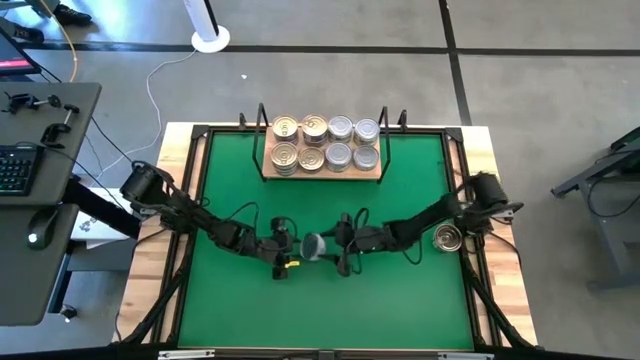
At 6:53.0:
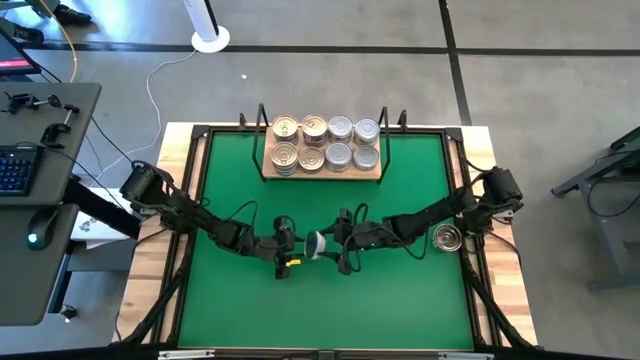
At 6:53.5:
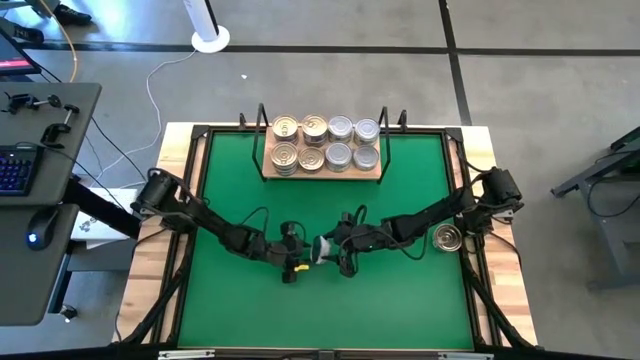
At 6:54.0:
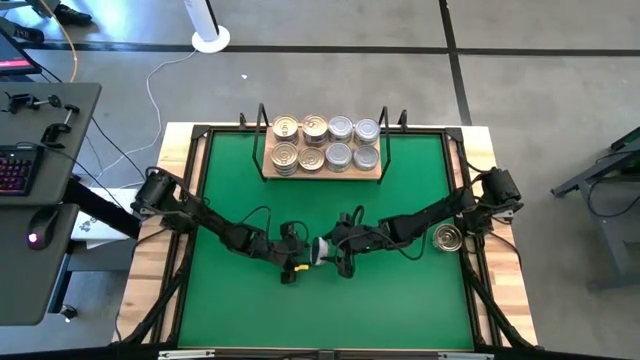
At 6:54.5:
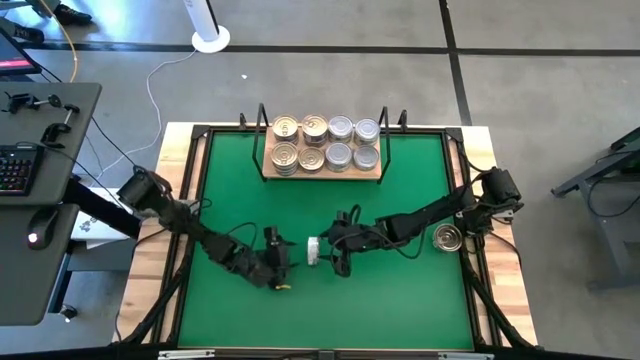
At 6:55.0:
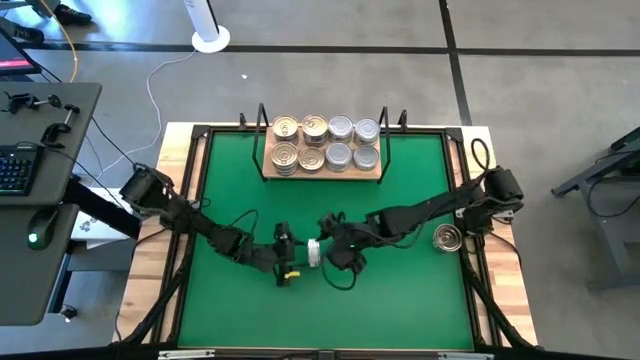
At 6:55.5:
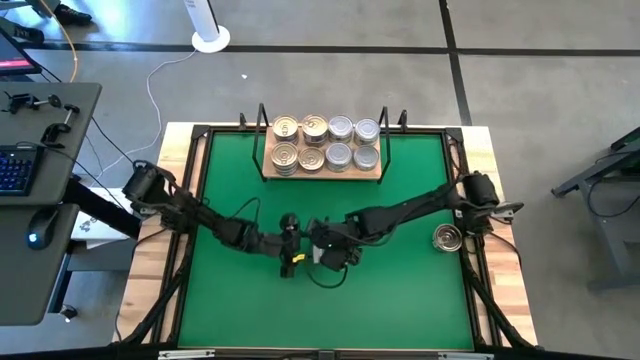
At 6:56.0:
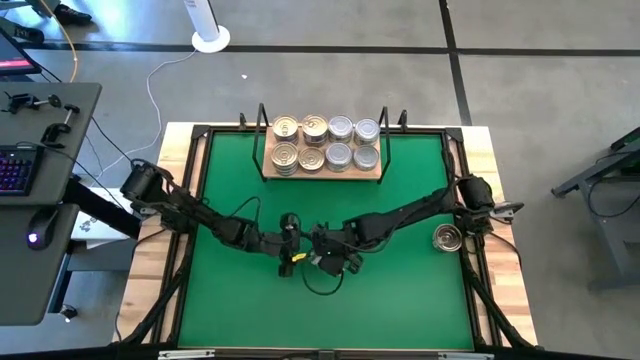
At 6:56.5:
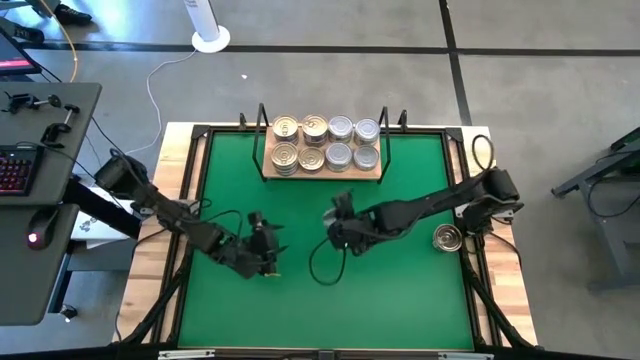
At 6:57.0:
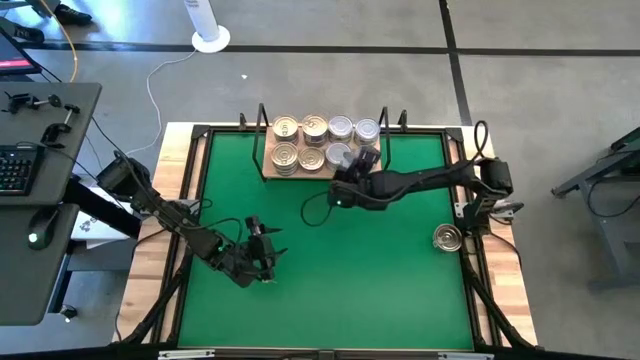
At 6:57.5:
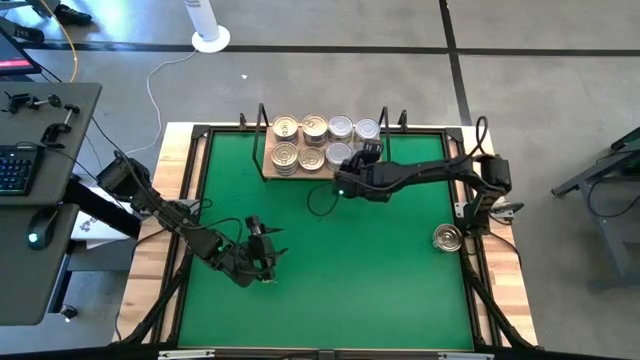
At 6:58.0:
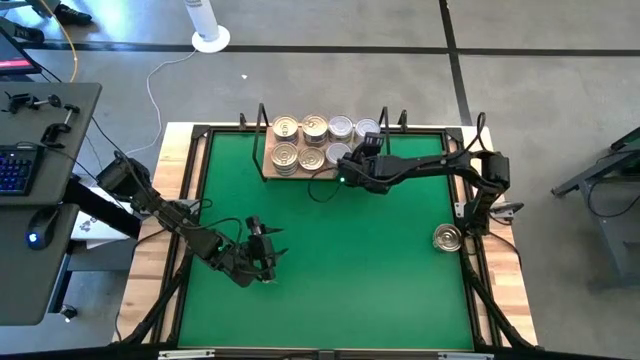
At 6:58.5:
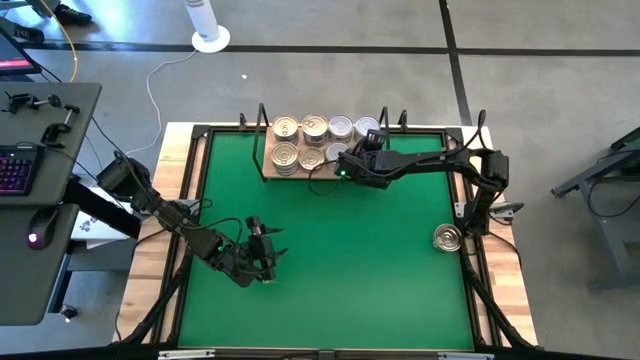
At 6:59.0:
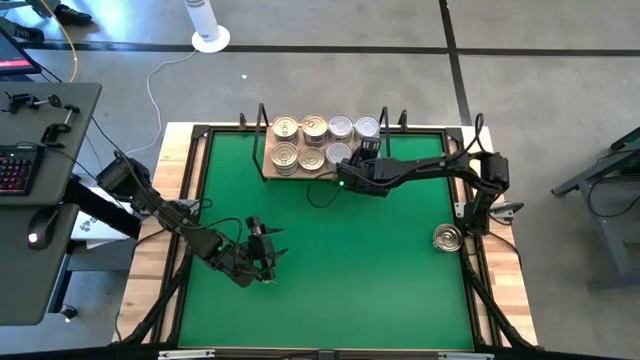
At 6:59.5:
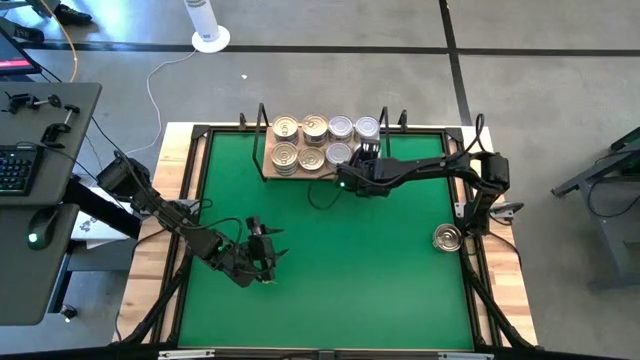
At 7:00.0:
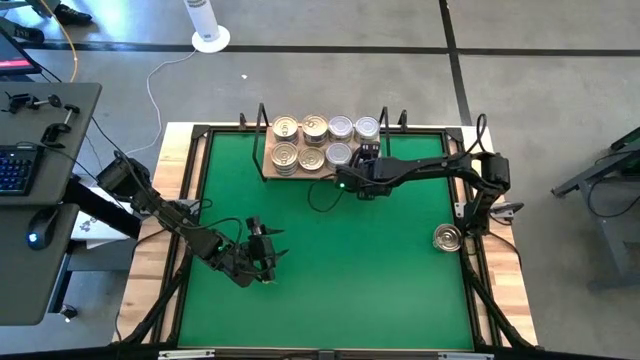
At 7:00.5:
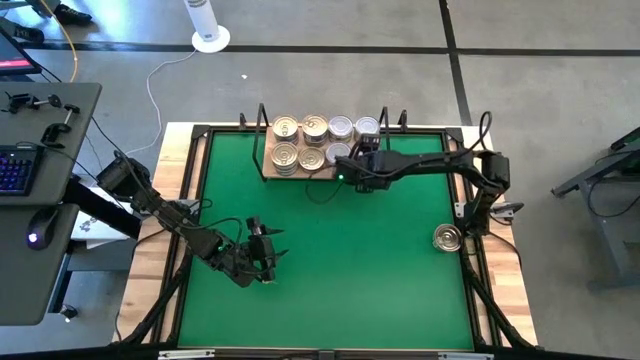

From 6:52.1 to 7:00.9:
Task: Stack canned seafood by type on shelf
Stack the green tuna can on top of the other green tuna can

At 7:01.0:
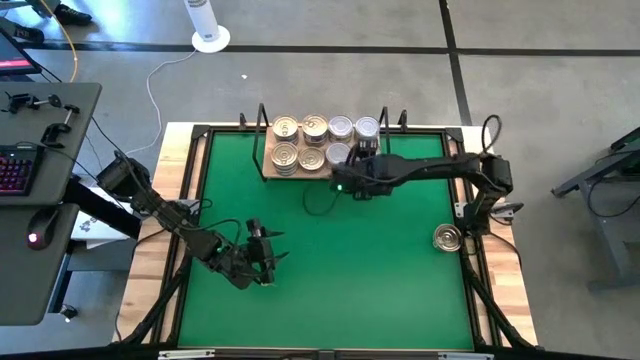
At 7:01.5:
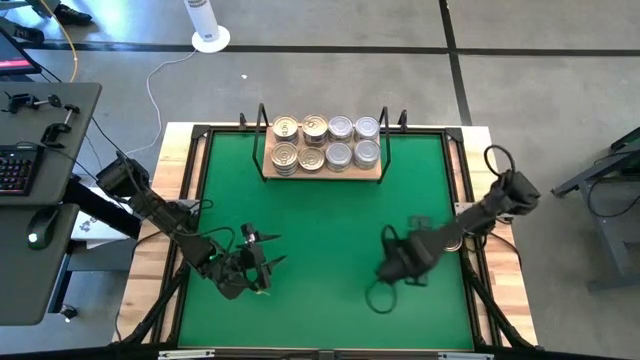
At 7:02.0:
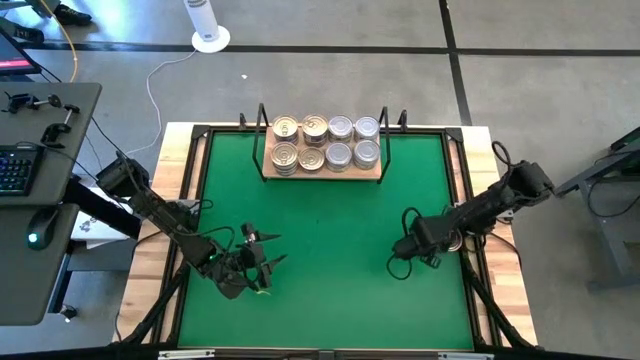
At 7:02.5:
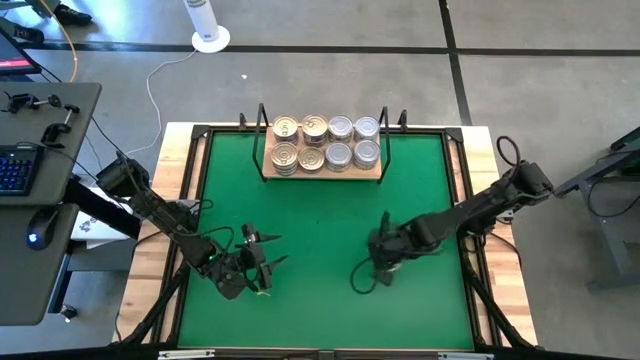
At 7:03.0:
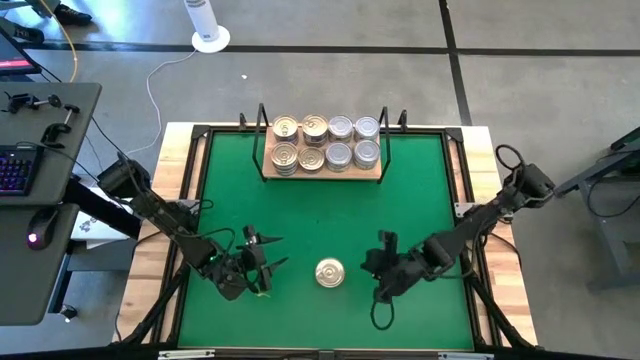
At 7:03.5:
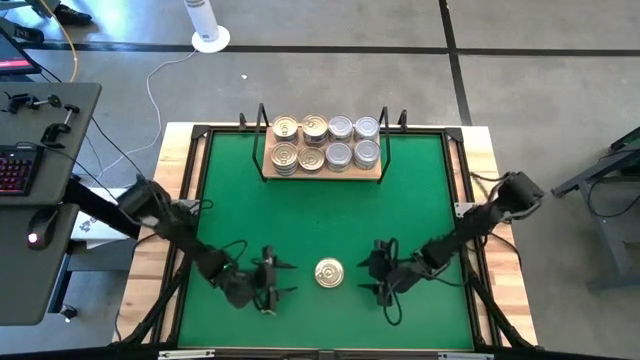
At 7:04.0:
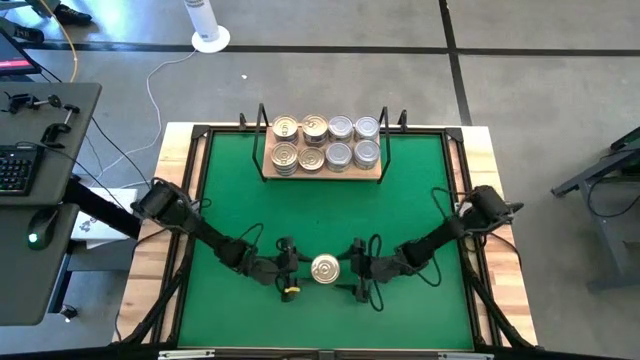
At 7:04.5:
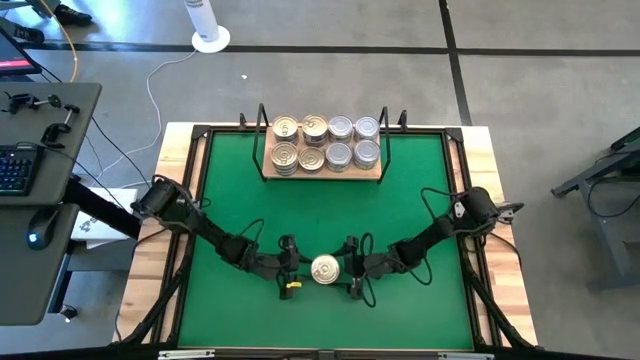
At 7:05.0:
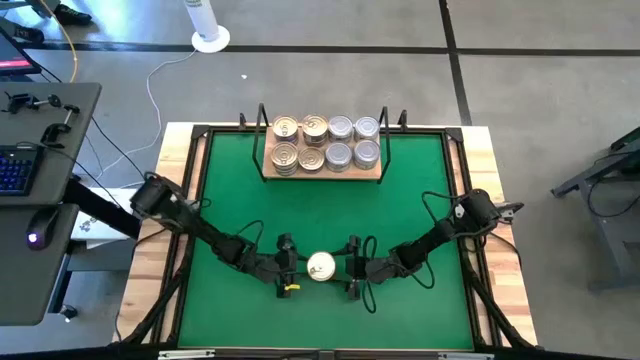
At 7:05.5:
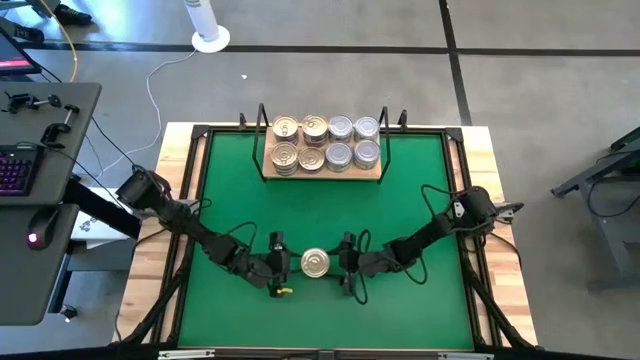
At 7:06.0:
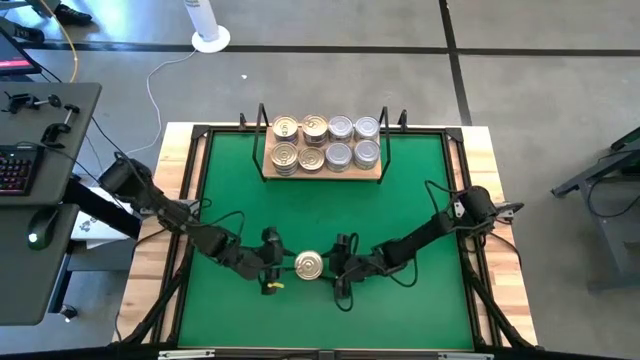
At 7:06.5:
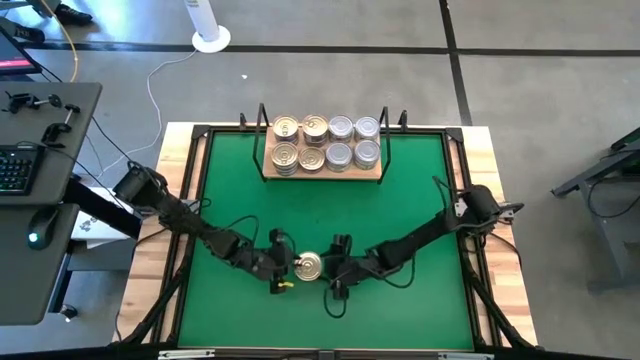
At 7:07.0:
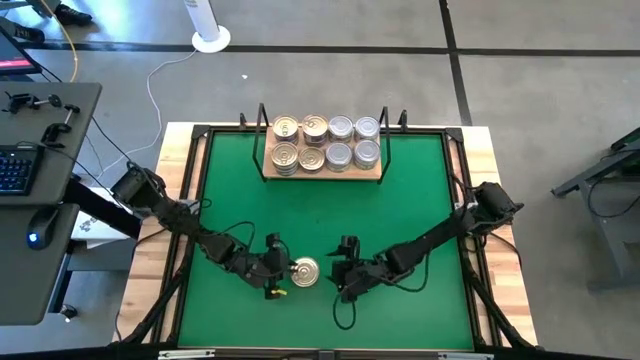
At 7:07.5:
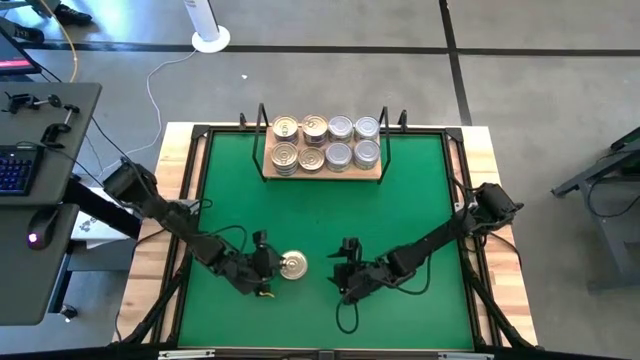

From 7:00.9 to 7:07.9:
Stack the blue/pink tuna can on top of the other blue/pink tuna can

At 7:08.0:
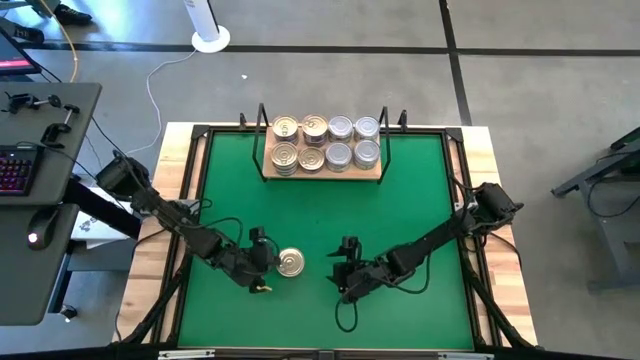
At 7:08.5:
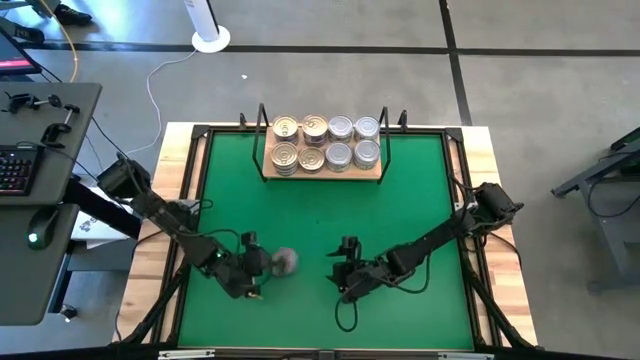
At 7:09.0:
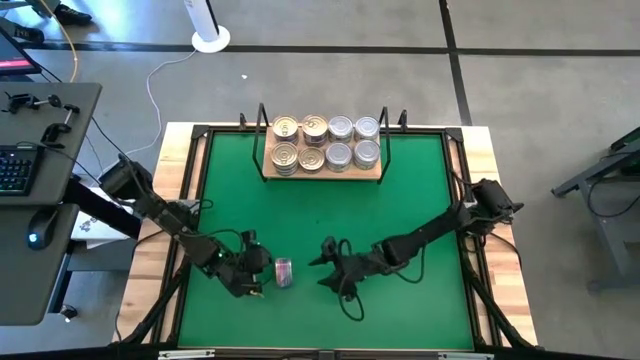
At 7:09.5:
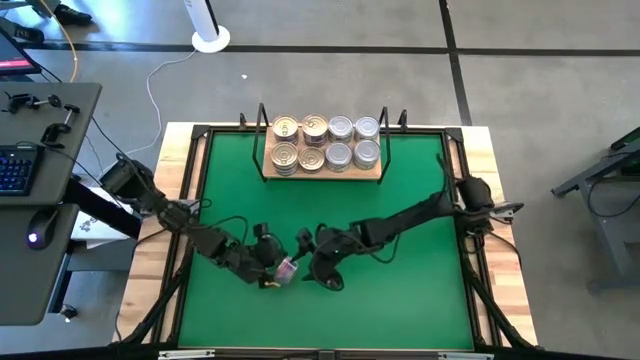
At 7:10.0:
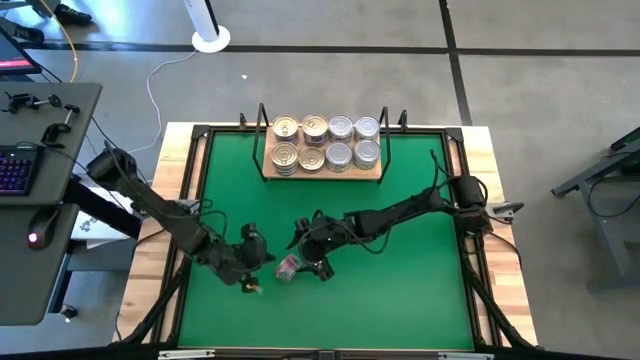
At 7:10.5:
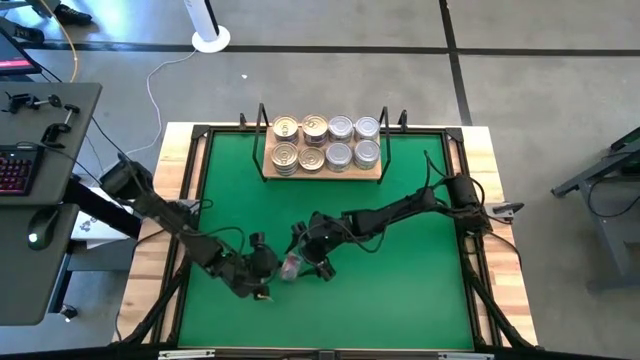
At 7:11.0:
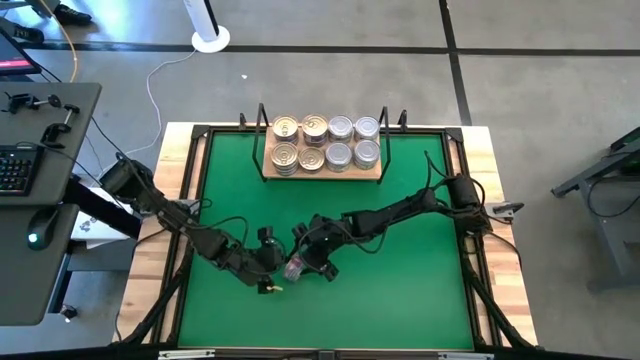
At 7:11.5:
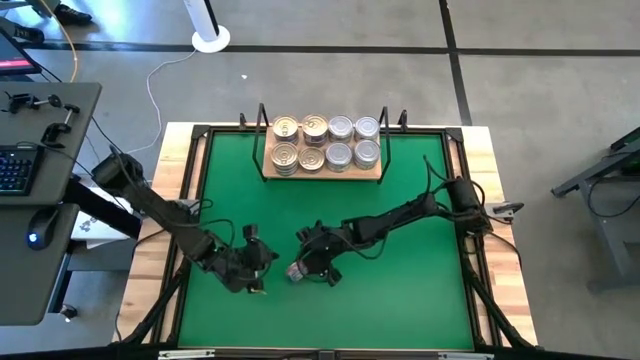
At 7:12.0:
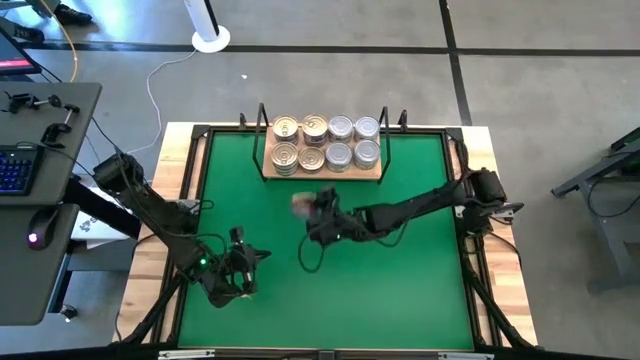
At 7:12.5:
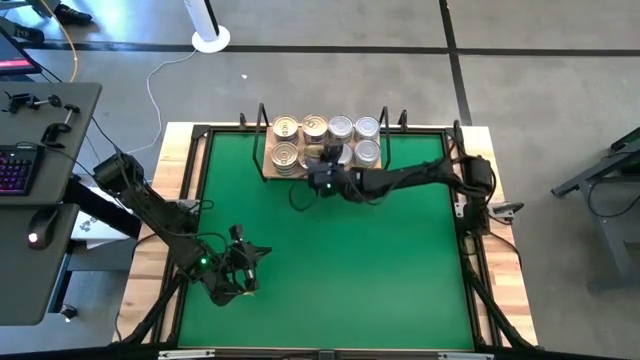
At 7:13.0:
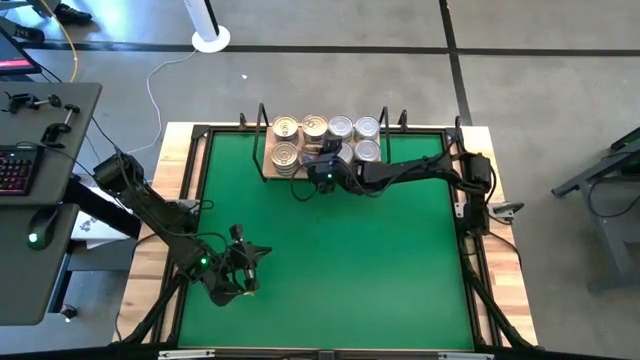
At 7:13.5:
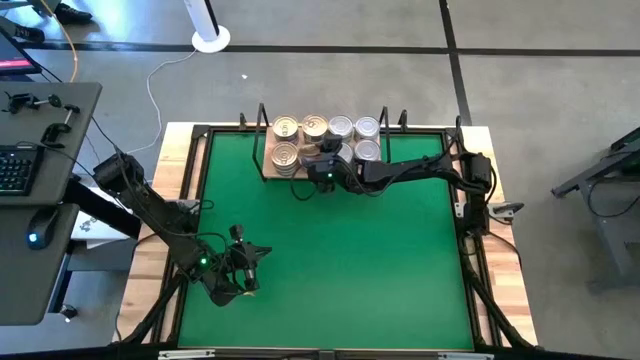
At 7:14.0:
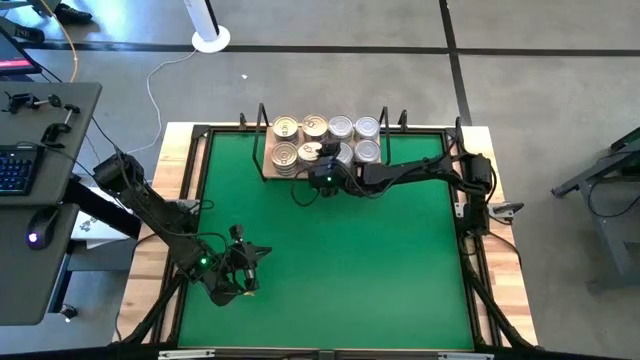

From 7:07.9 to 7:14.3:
Stack the blue/pink tuna can on top of the other blue/pink tuna can
